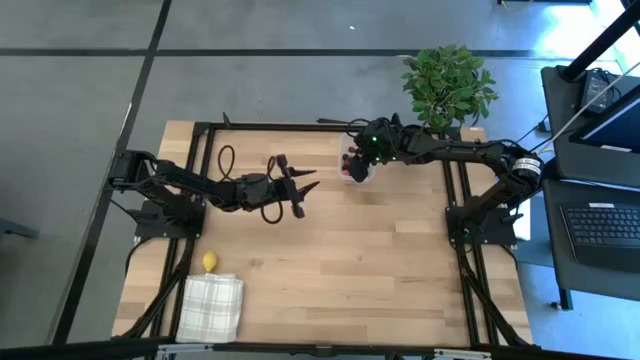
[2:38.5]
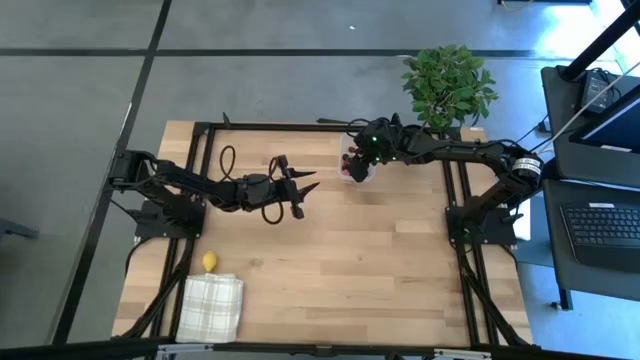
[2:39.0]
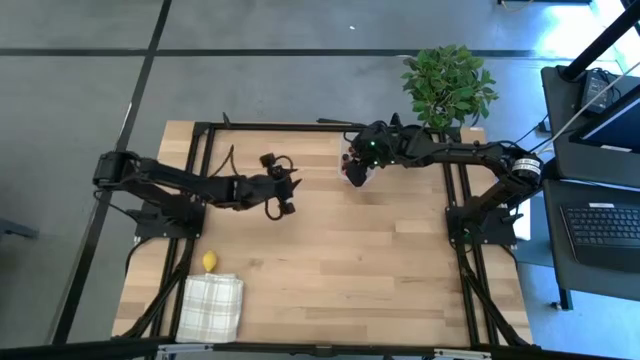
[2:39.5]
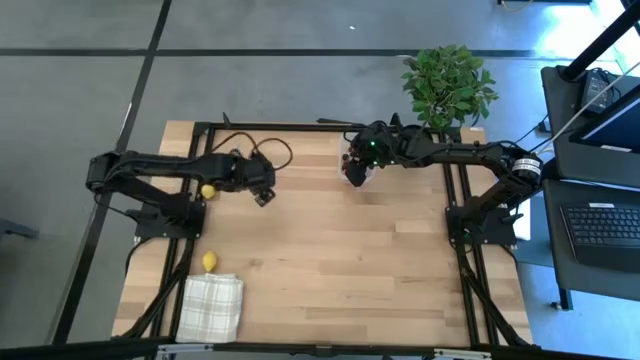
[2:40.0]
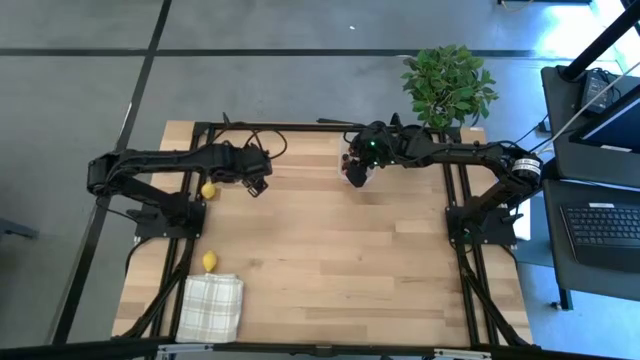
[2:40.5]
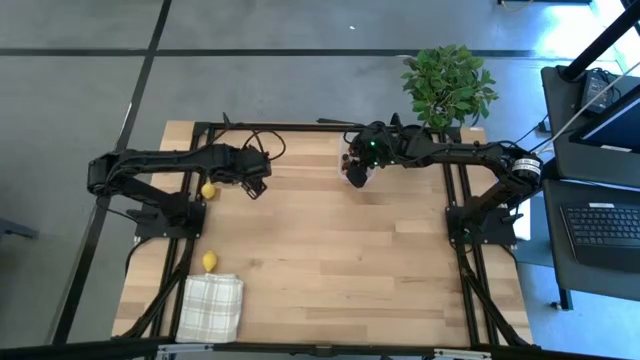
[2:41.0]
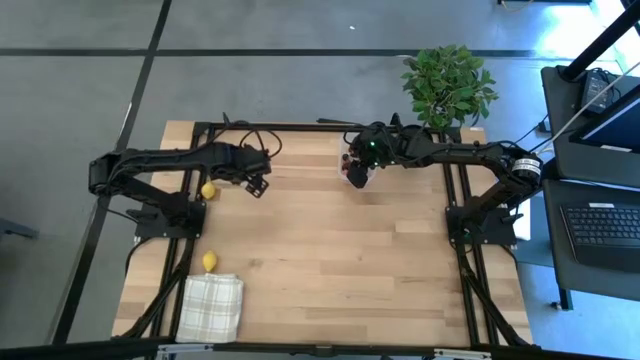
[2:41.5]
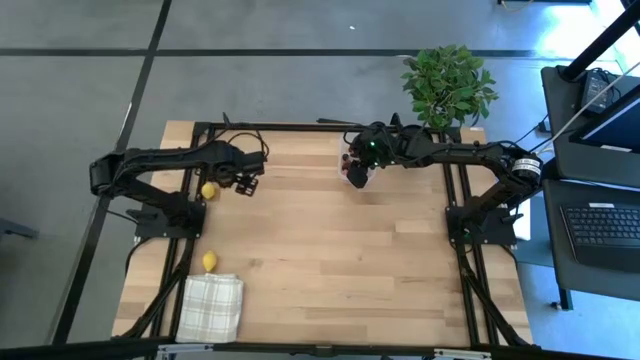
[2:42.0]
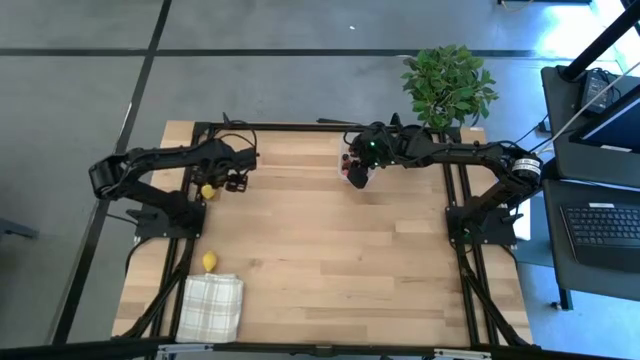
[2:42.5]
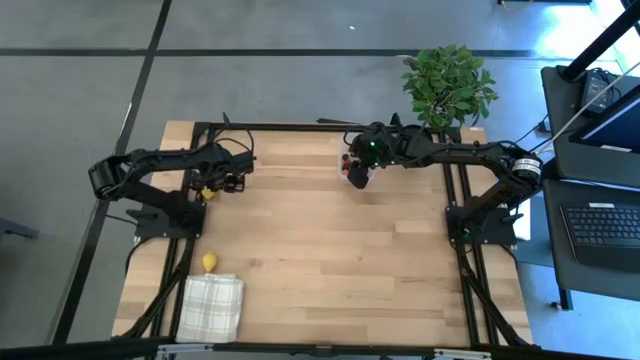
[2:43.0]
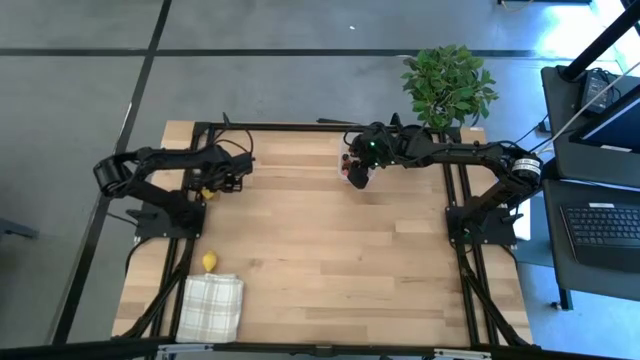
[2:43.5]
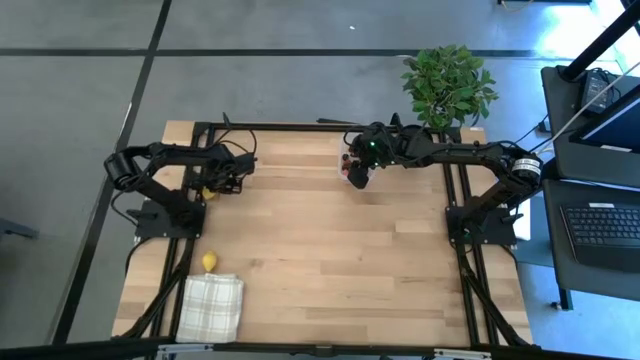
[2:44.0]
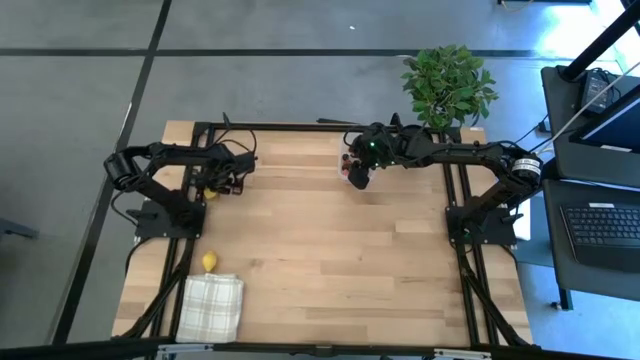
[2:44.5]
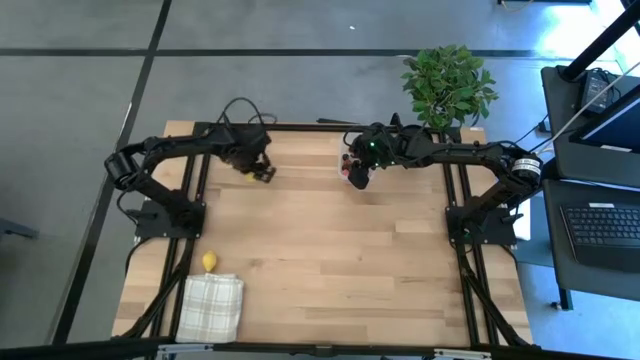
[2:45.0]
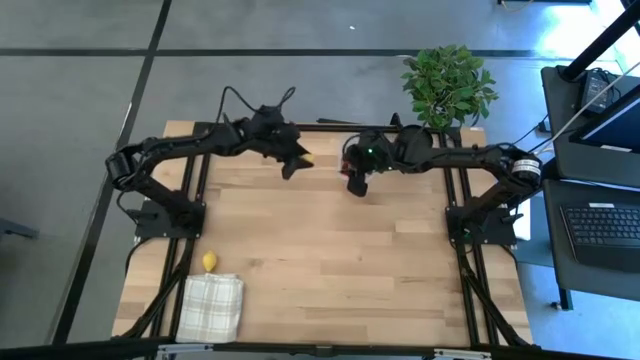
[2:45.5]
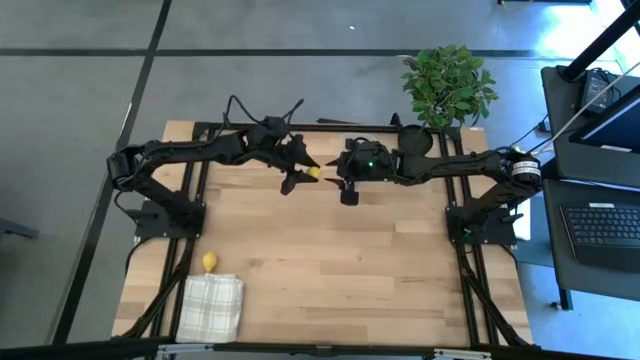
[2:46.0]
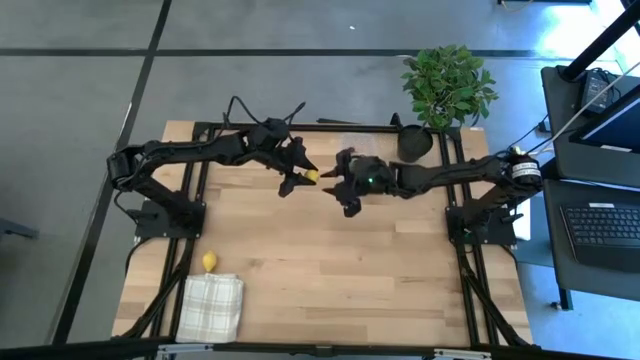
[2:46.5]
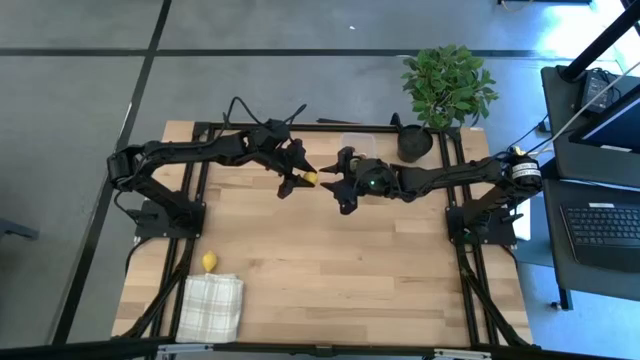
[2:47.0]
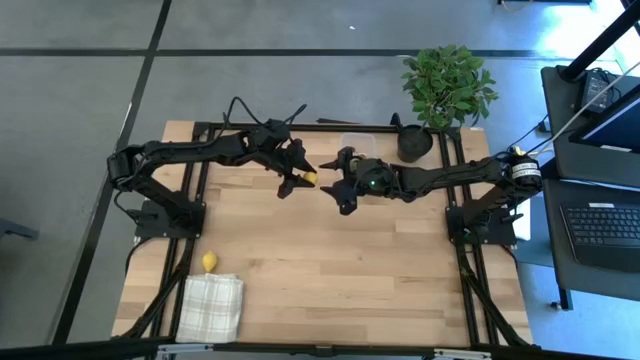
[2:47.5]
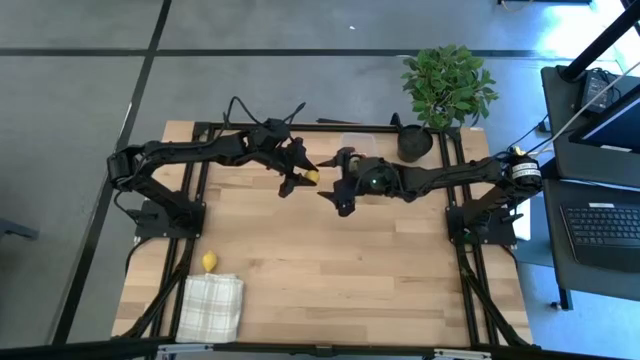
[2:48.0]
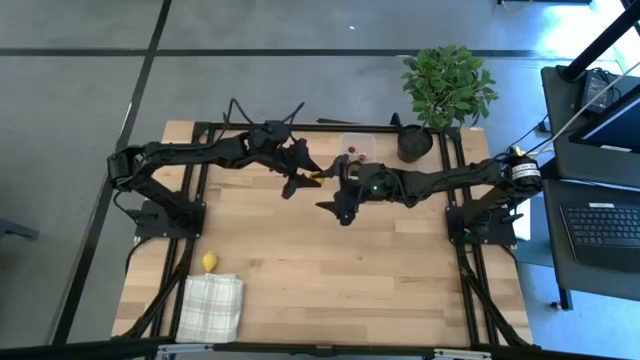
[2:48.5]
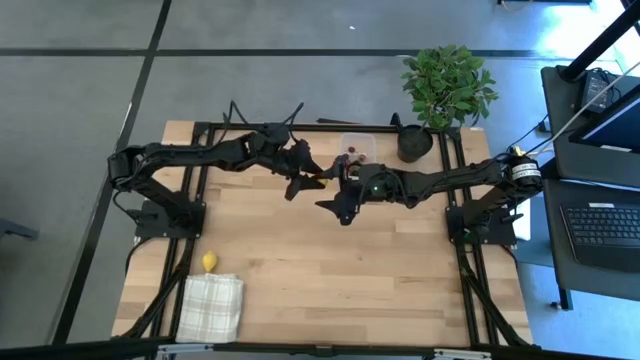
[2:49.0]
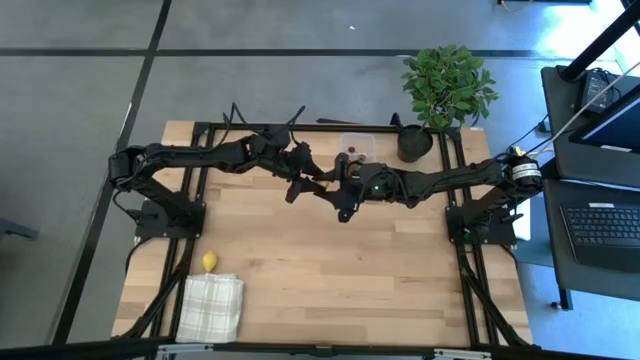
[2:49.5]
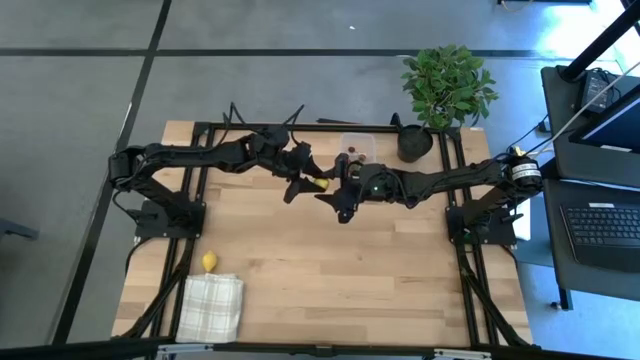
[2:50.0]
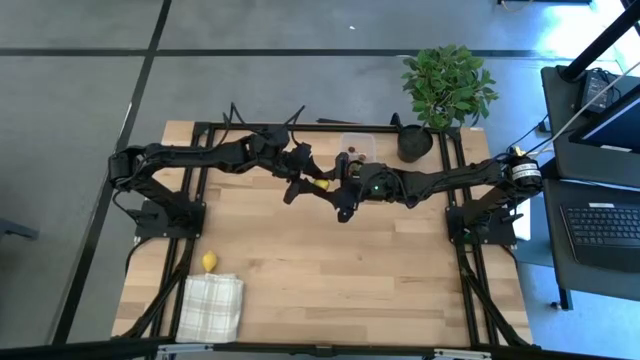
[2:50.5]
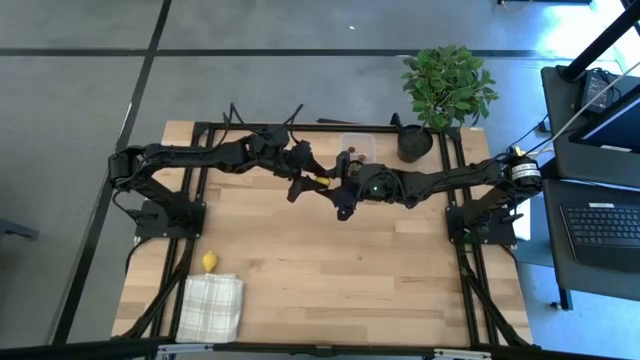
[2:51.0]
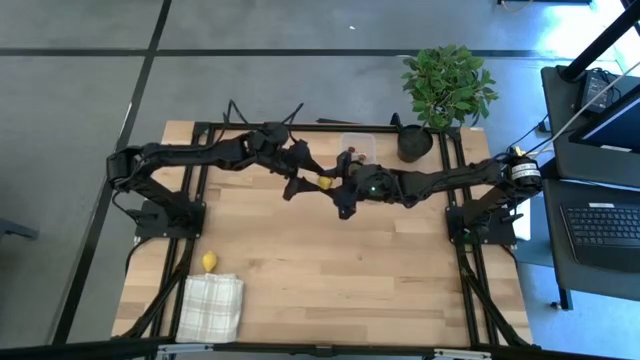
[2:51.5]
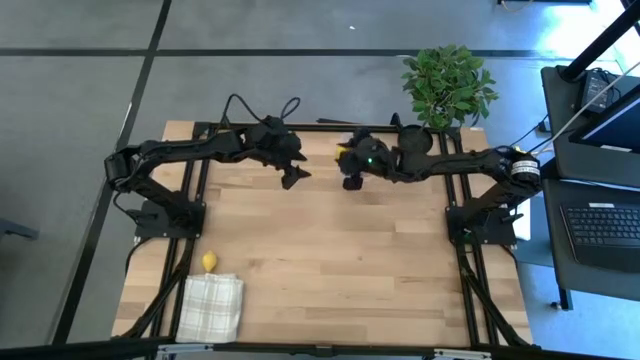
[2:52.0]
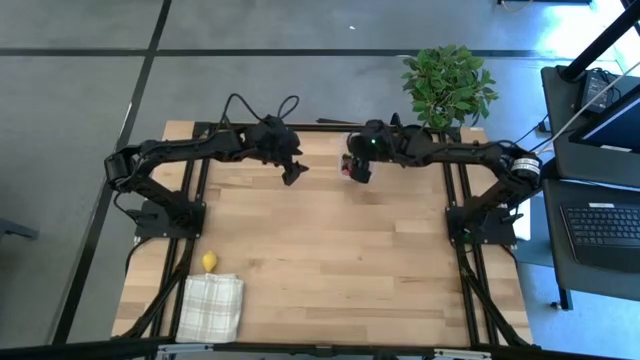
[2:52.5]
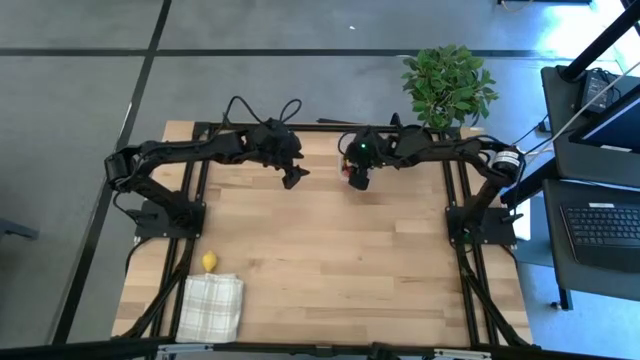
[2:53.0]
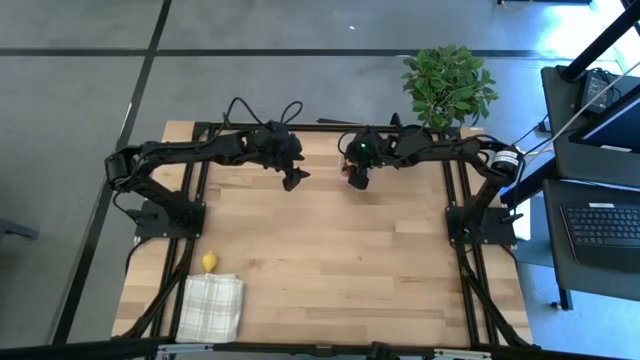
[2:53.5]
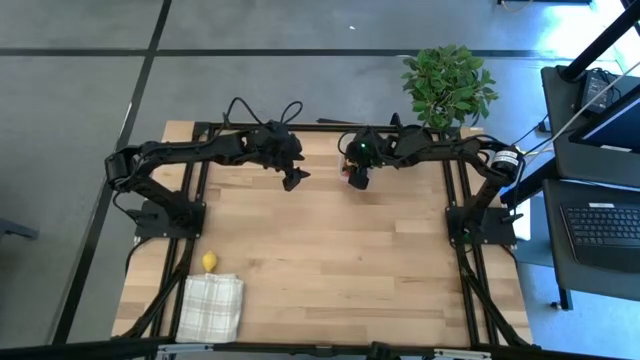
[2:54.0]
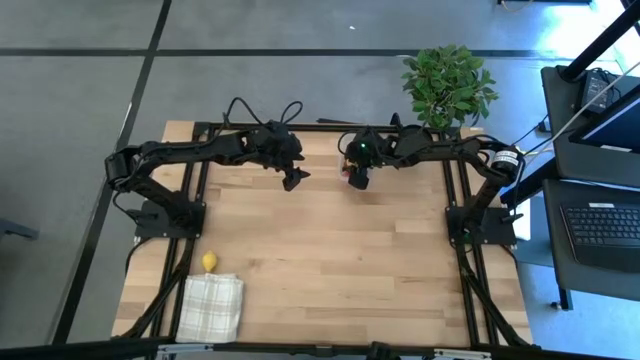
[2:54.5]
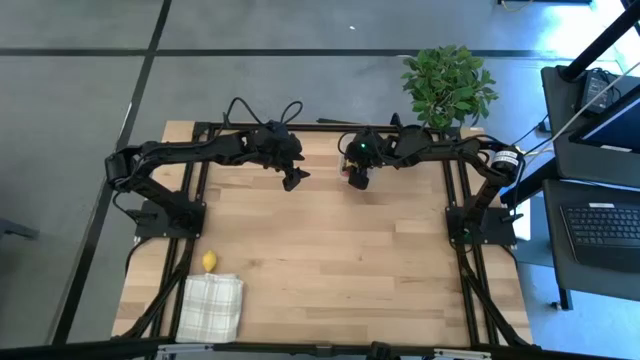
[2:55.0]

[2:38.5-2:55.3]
Task: Pick and placing Produce into tupperware
Put the top lemon into the transparent bin

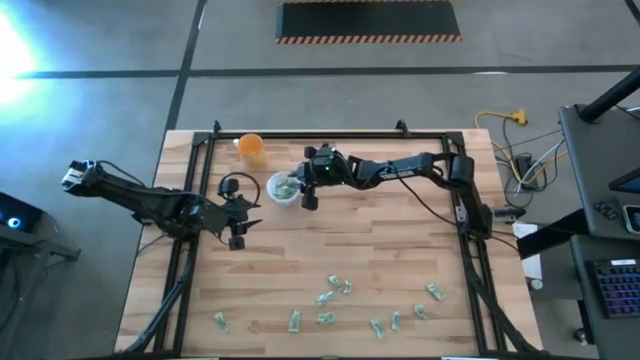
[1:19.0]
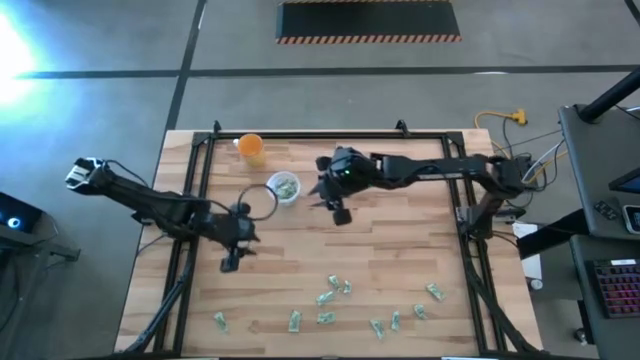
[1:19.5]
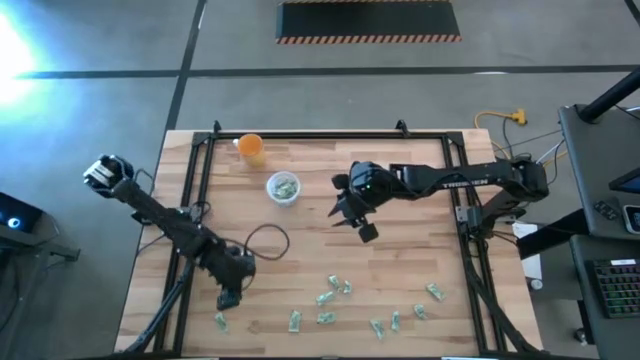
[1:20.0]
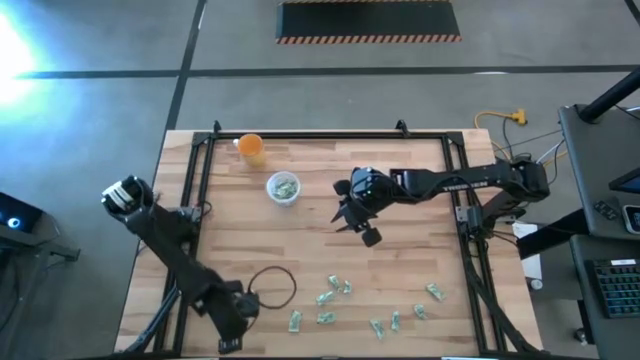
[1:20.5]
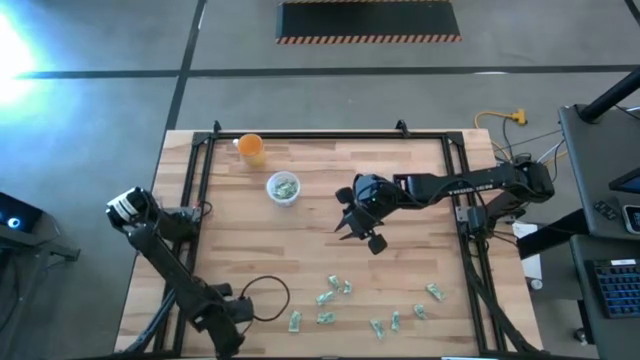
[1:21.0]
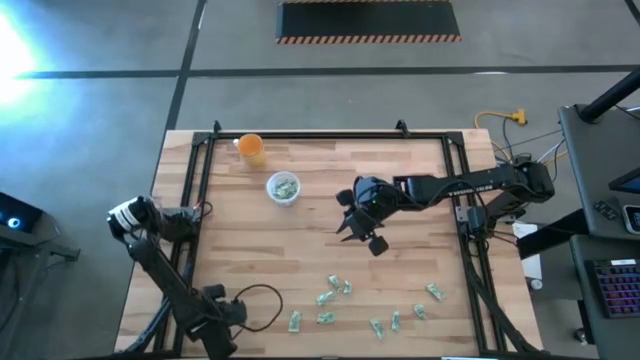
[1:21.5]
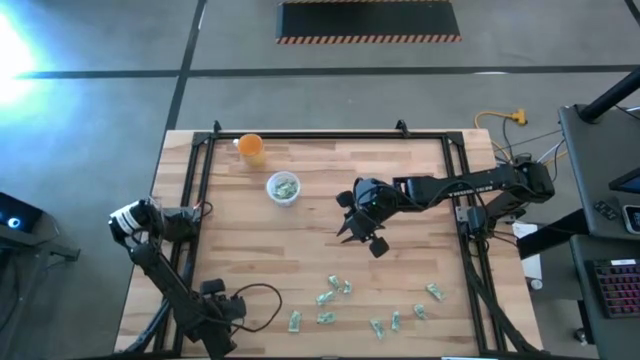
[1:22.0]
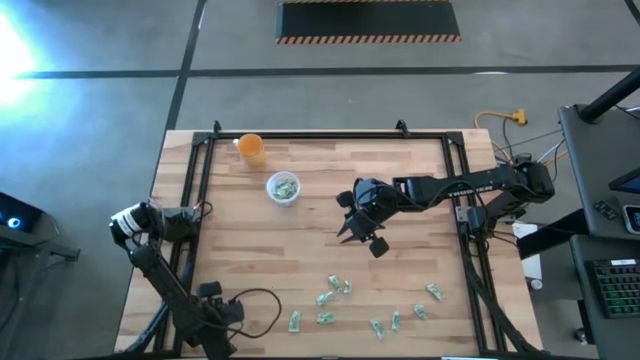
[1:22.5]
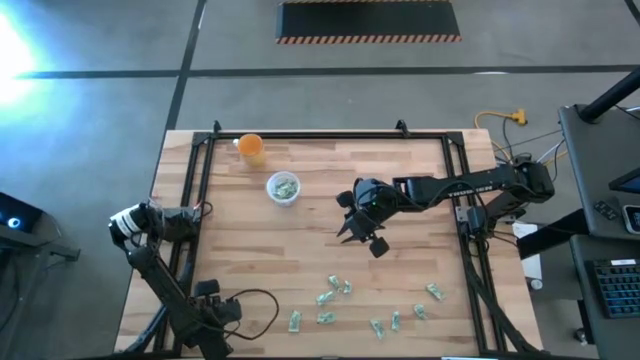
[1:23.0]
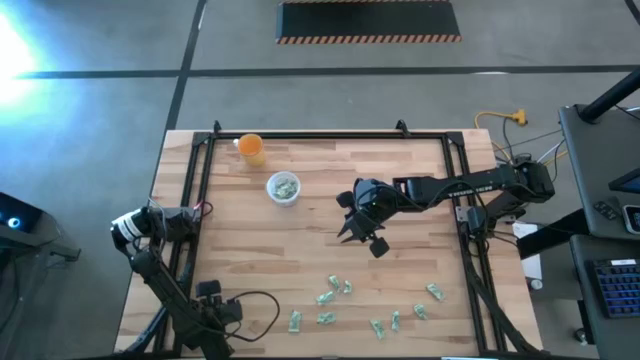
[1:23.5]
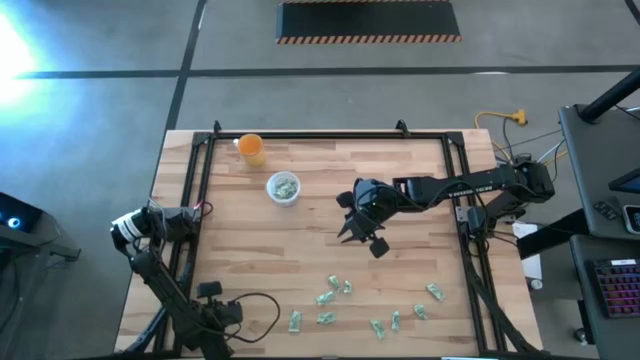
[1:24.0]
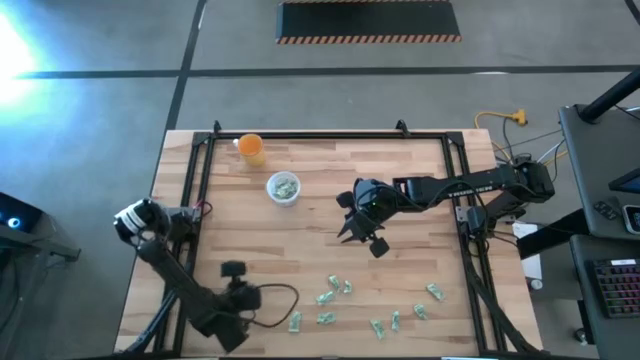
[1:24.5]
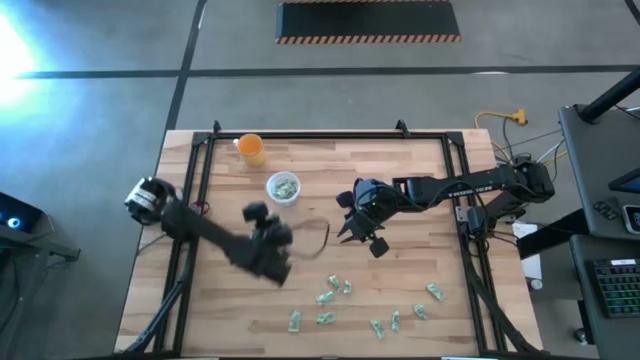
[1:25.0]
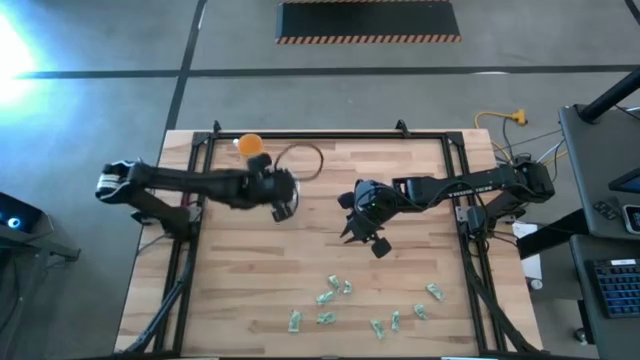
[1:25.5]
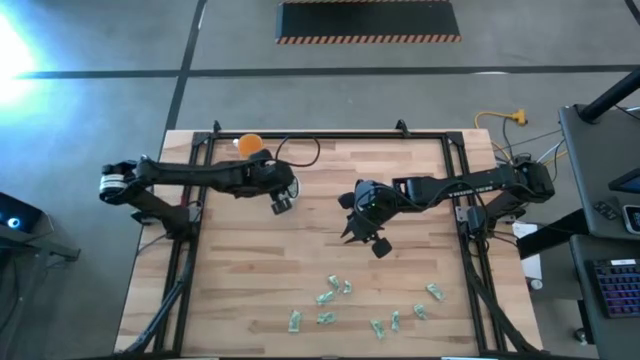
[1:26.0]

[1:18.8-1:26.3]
Task: Pick and place Stevia / Truvia into bins
Put the stevia packet into the transparent container
